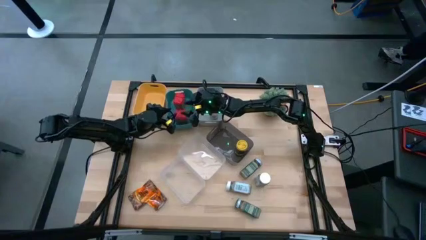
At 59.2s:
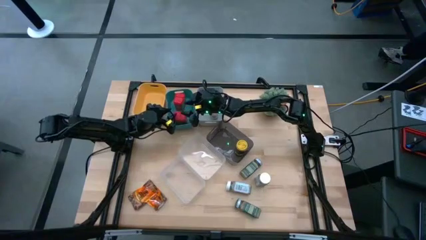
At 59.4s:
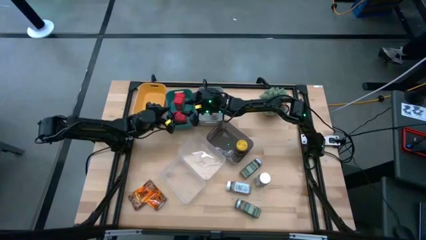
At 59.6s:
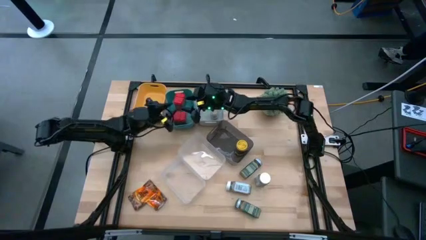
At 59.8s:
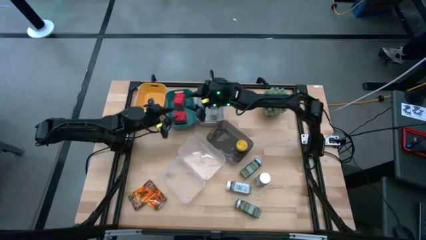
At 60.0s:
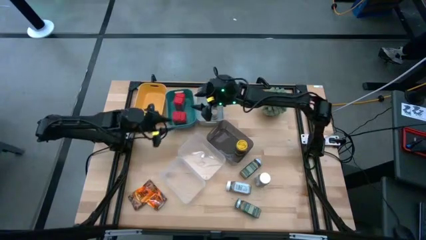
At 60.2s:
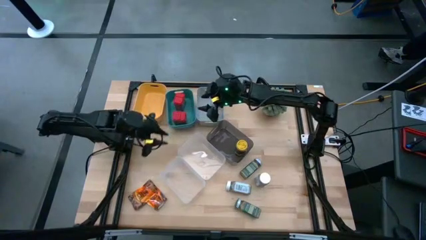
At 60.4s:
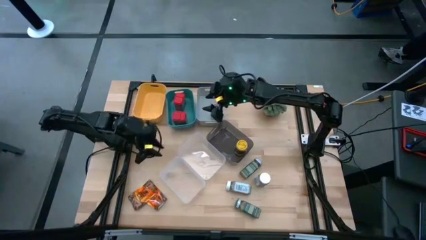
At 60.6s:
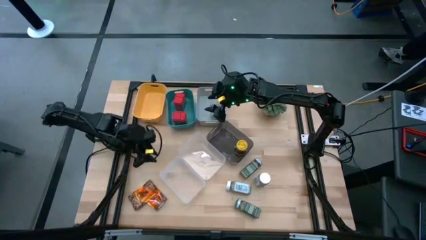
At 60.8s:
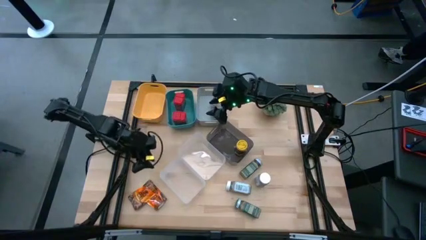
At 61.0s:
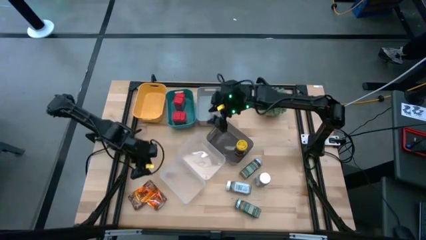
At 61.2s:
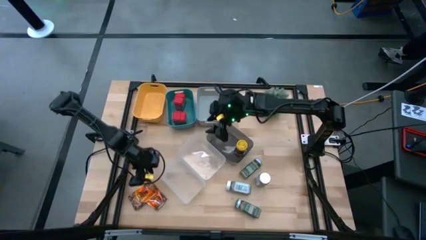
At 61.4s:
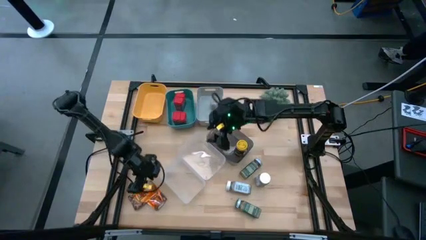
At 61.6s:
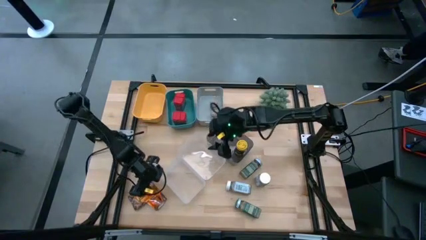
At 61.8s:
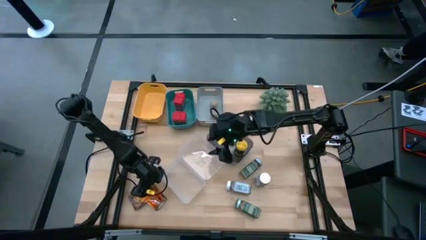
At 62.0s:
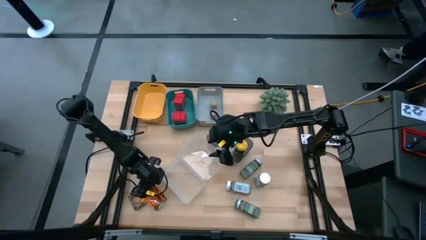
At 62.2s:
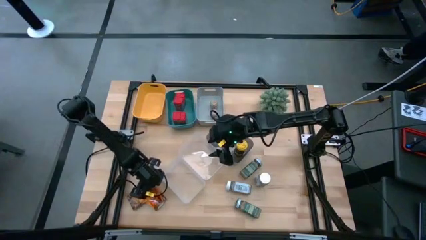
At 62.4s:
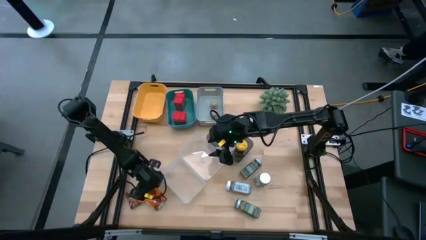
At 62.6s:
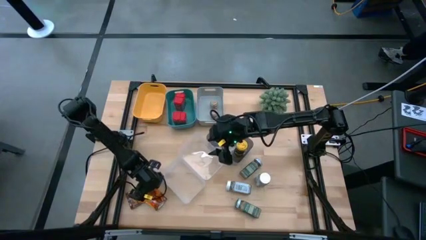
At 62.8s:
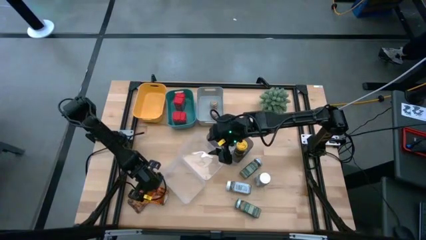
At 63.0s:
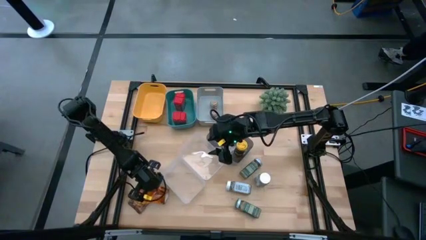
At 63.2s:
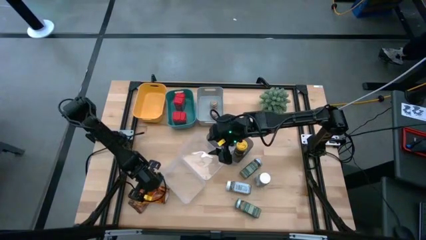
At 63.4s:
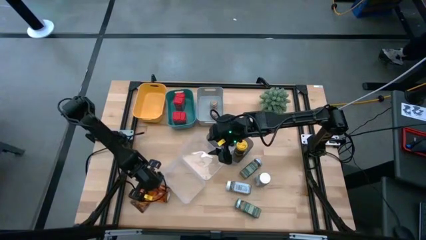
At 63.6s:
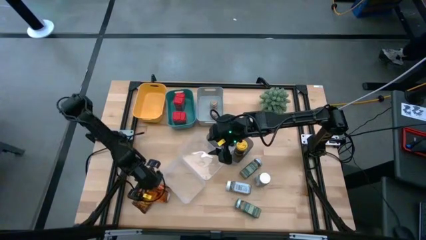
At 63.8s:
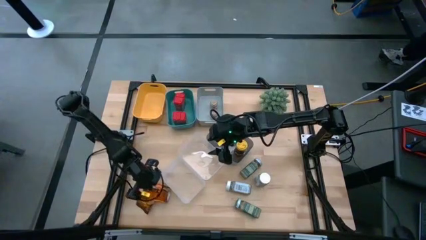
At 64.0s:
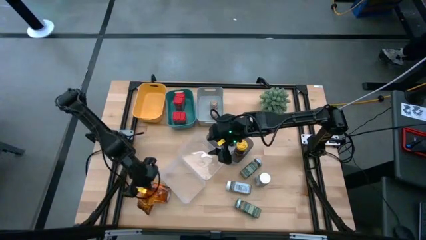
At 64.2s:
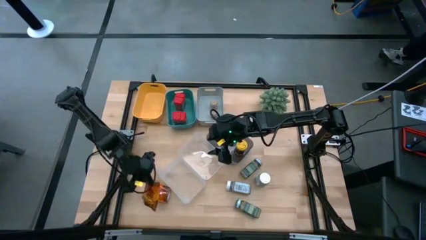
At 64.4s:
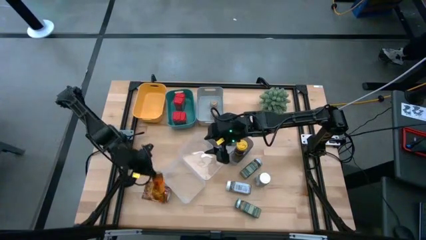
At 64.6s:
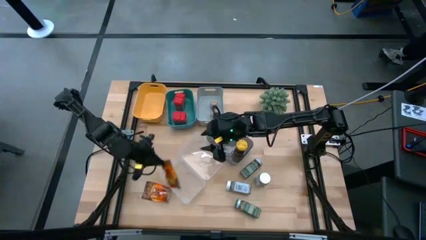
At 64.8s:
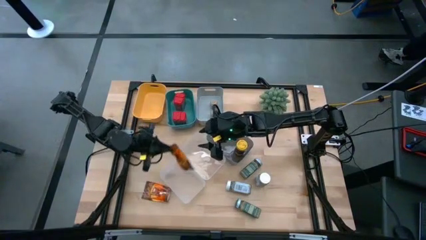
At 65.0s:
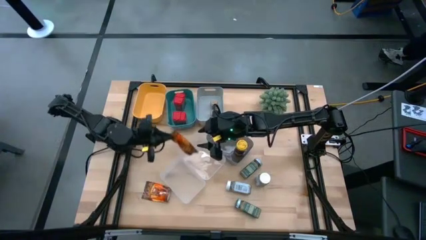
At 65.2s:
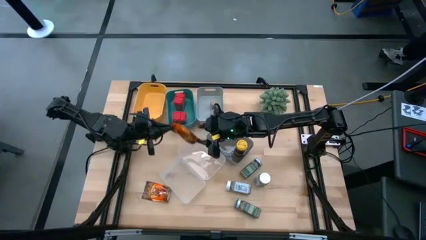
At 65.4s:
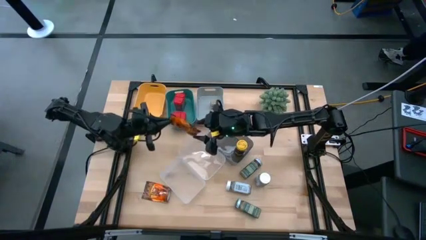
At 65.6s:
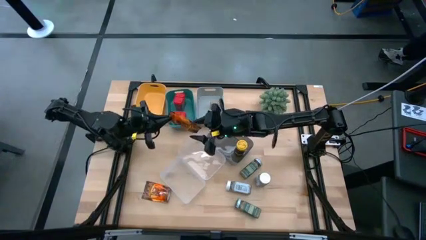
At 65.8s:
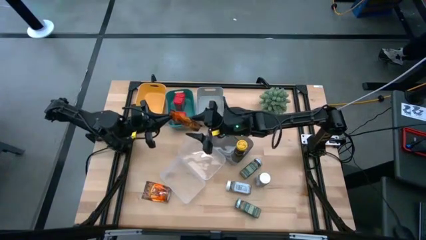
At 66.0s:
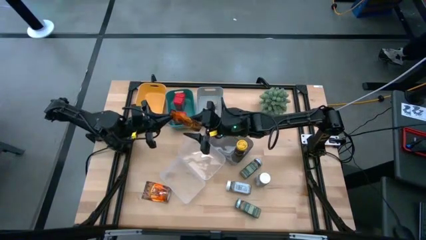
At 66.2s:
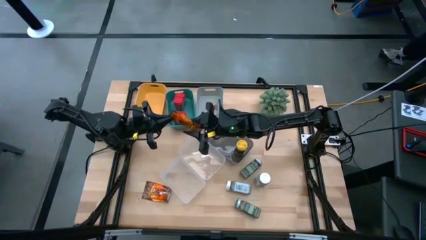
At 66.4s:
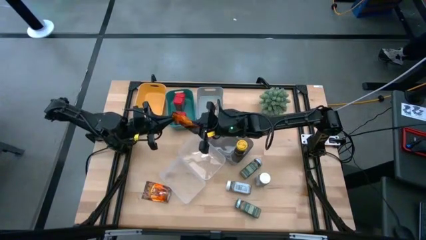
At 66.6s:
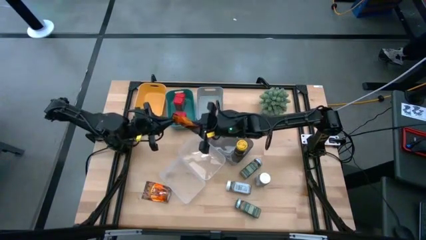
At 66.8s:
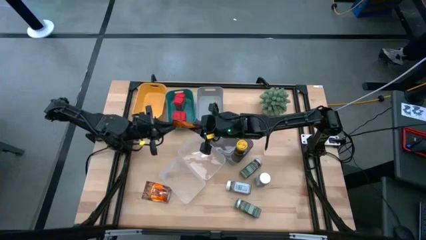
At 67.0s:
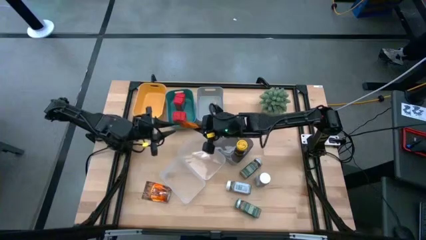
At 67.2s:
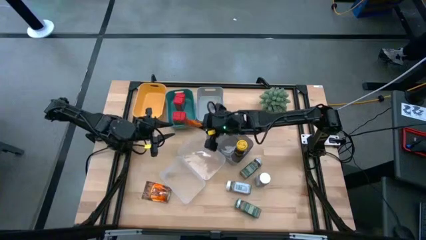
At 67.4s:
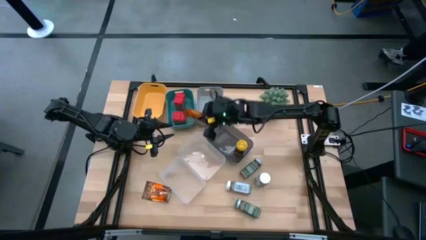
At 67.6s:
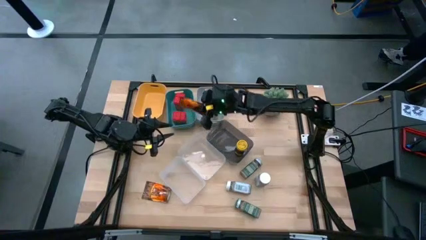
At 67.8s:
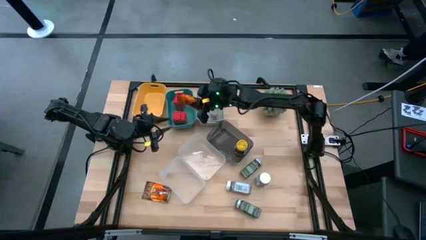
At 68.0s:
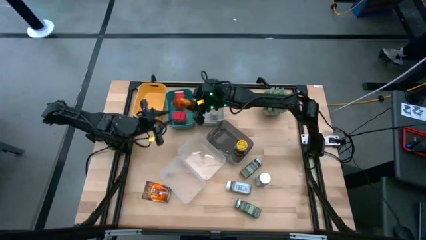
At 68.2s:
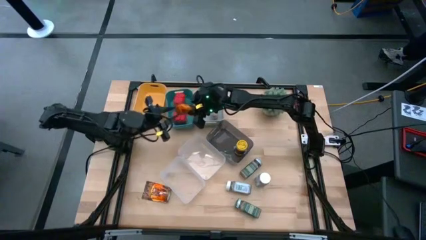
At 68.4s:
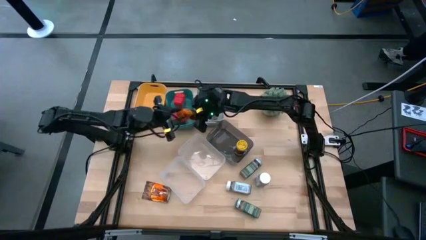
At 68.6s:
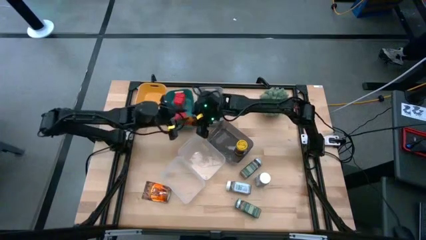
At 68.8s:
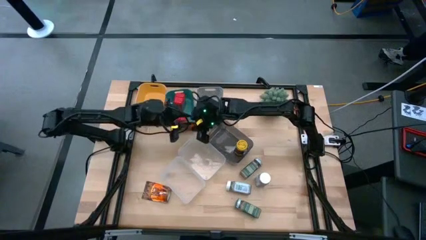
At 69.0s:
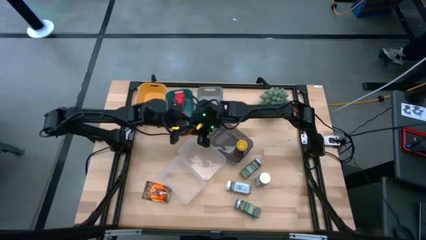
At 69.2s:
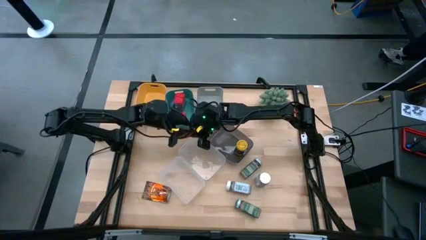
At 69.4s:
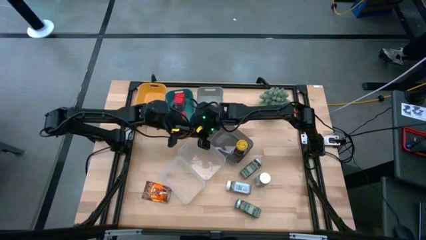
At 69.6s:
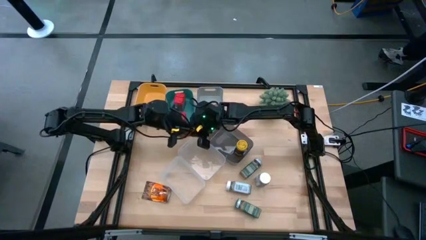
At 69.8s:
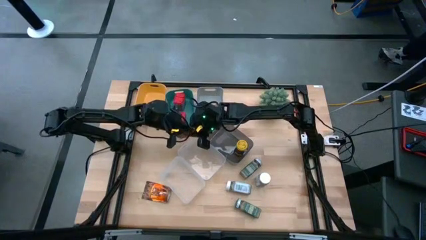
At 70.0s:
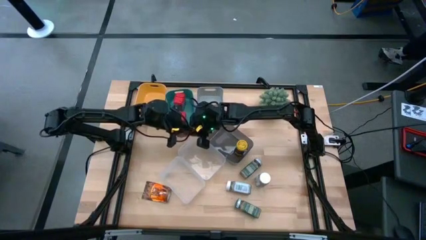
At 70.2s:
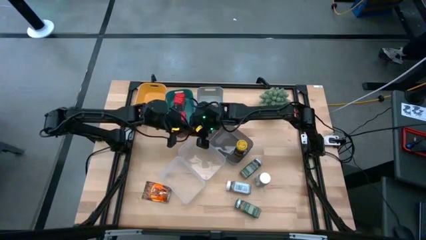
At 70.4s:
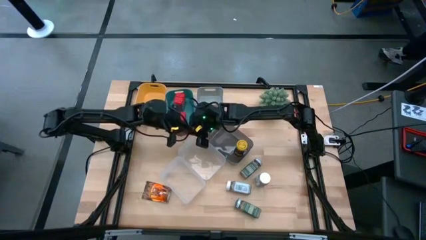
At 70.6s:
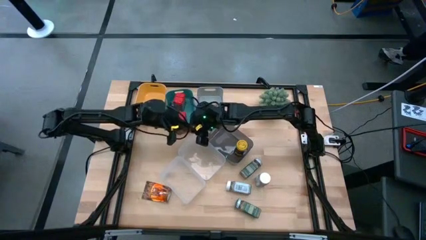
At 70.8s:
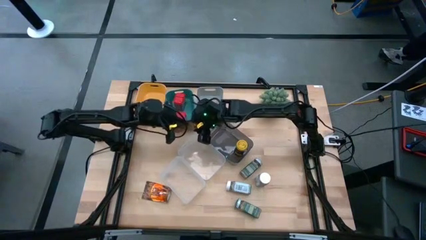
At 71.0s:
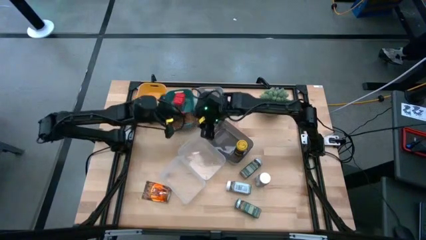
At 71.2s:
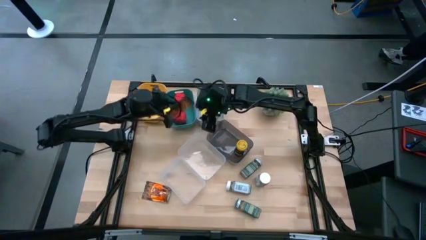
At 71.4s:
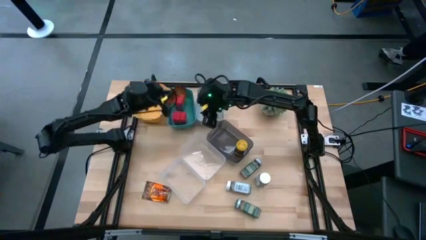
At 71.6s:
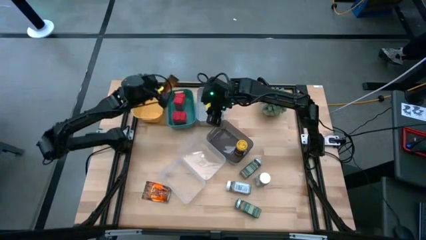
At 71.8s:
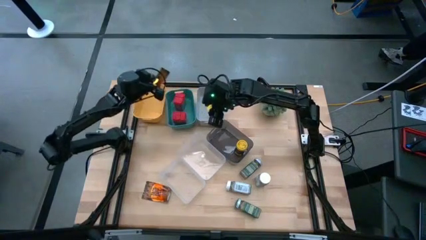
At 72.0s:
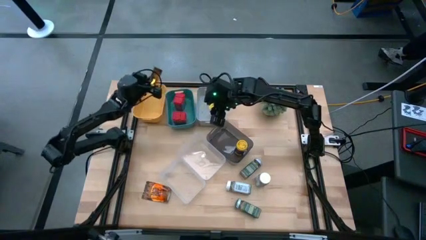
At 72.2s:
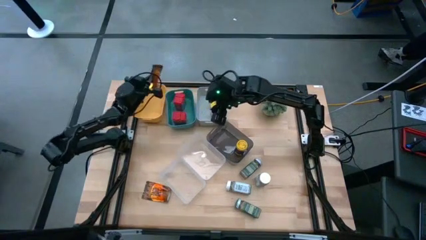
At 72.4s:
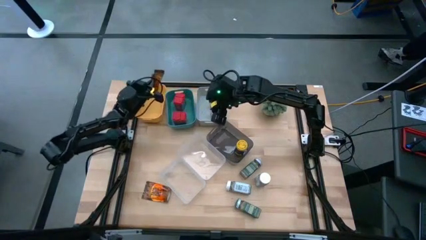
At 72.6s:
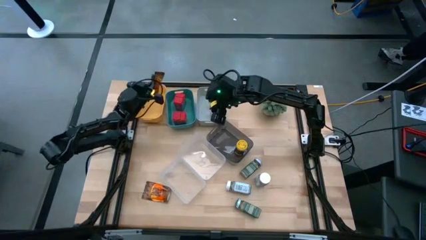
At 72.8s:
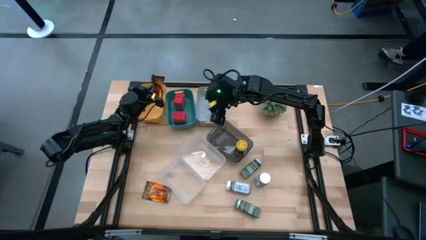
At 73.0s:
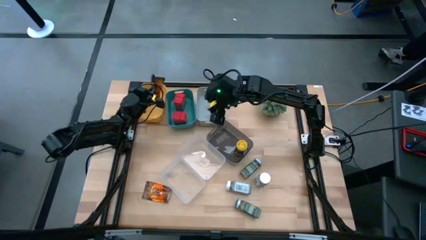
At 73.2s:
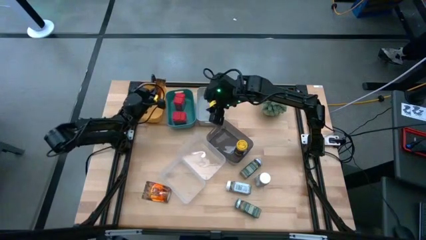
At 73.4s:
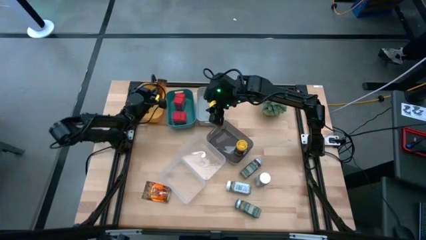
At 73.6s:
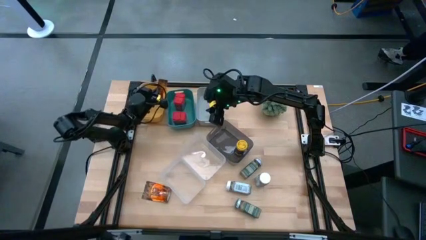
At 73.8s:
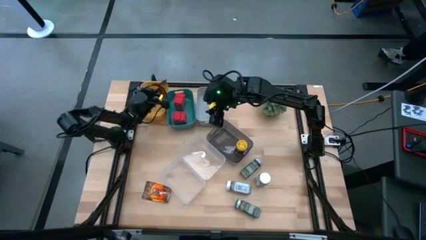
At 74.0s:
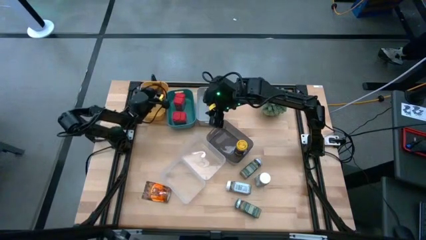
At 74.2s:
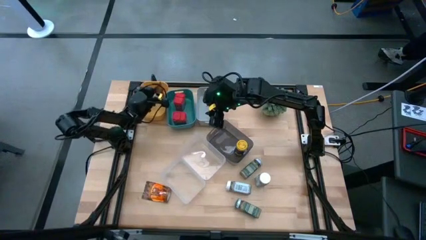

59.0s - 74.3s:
Task: Sort spices by type
Put the orange seasoning pack into the yellow bin

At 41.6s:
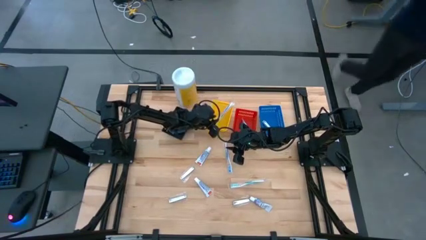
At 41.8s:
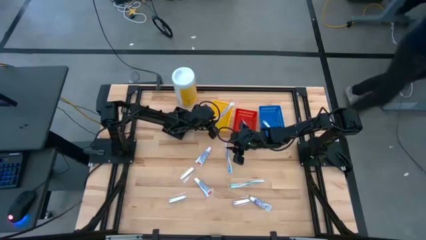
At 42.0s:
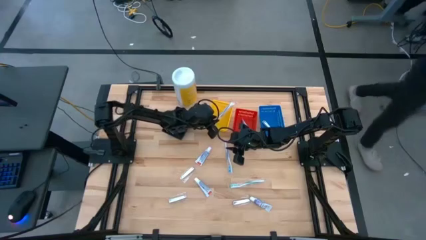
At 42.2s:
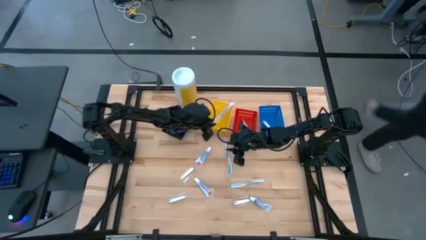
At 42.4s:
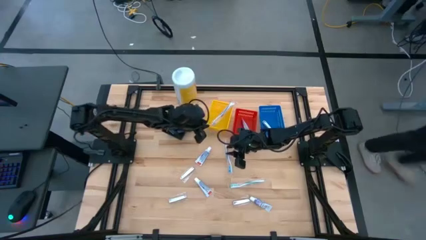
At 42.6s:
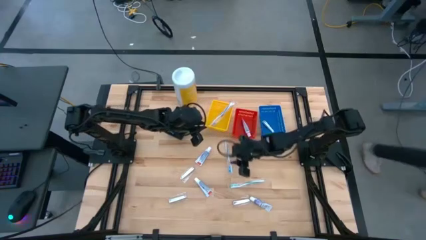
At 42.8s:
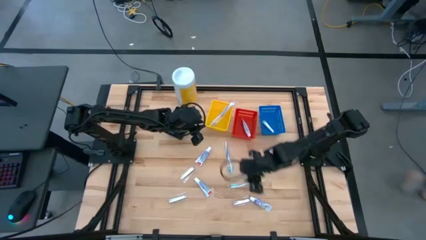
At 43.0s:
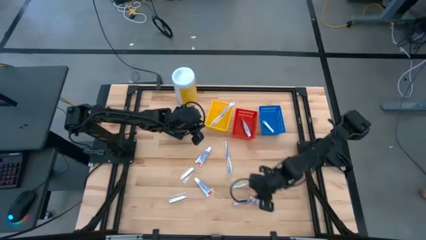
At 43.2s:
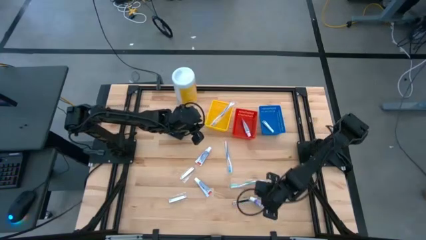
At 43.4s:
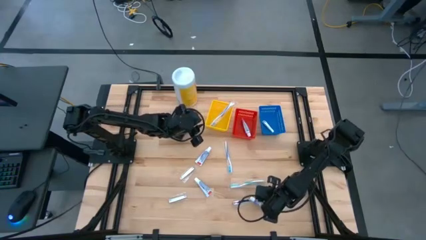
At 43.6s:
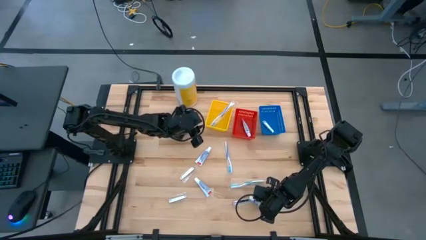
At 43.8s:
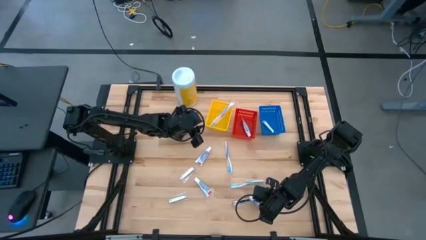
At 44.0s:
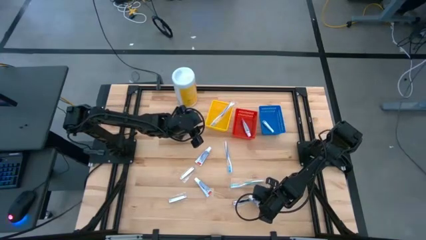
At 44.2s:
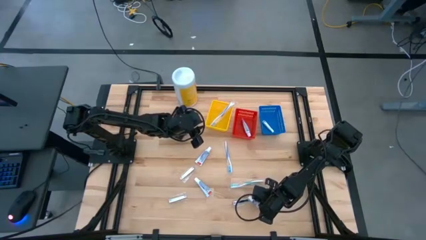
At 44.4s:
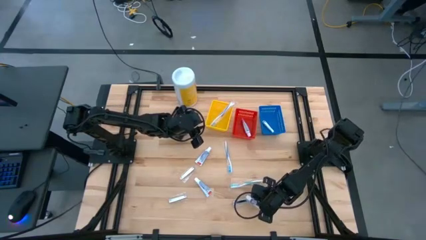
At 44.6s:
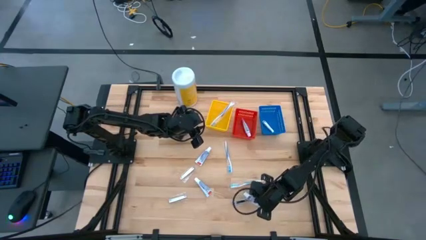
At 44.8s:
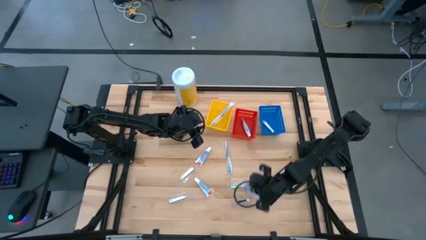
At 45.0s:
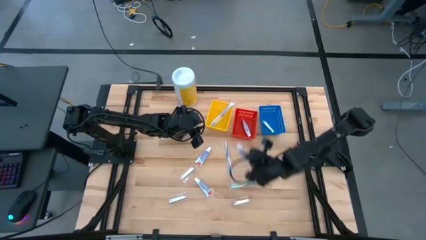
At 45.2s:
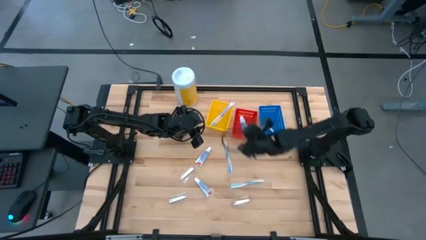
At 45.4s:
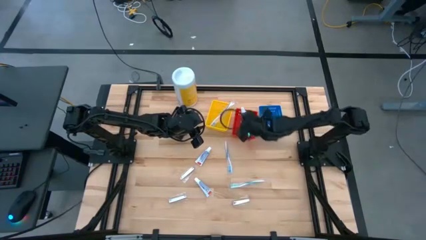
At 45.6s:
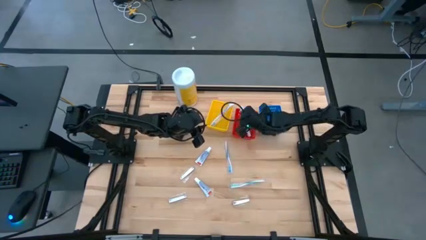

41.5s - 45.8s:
Task: Pick & Place Travel size toiletries
Put the white toothpaste into the red bin
